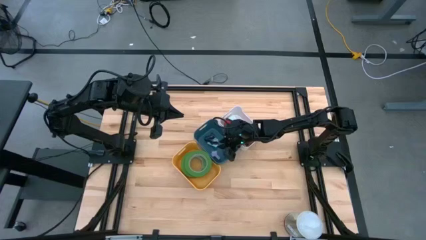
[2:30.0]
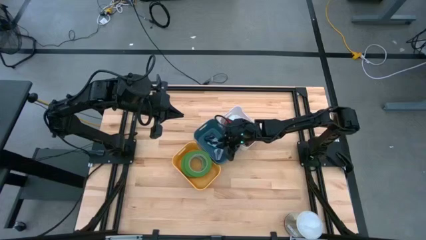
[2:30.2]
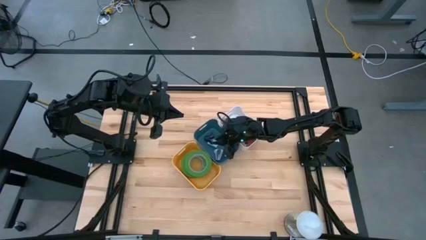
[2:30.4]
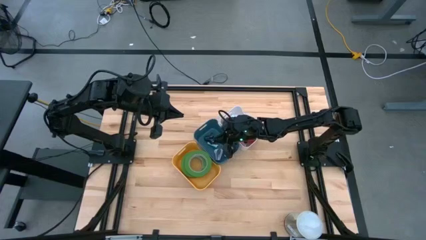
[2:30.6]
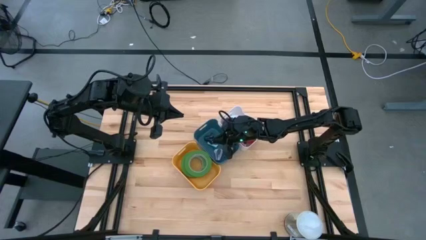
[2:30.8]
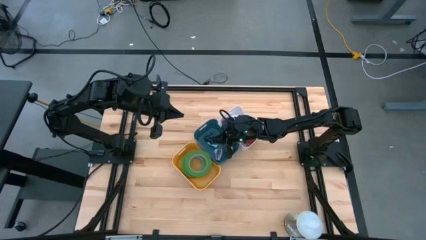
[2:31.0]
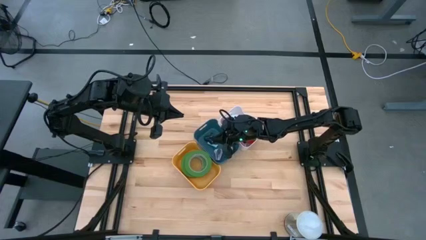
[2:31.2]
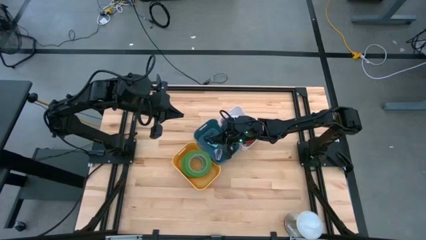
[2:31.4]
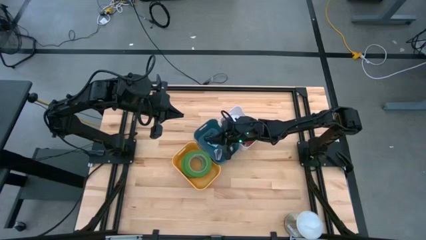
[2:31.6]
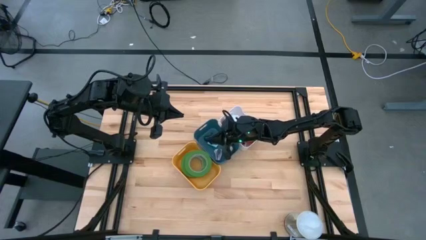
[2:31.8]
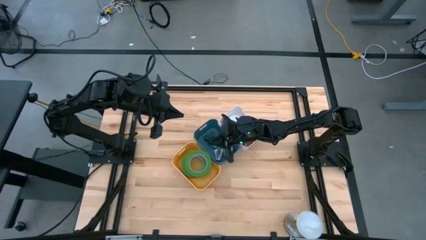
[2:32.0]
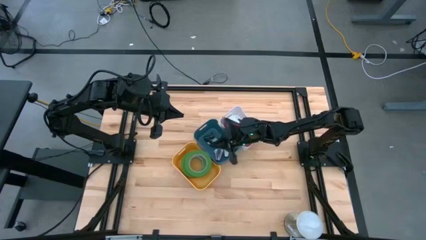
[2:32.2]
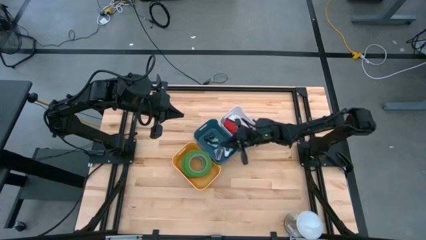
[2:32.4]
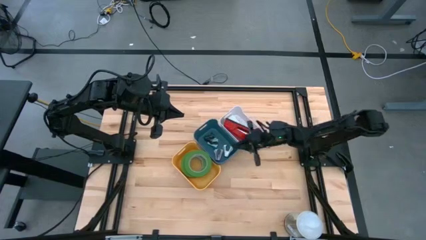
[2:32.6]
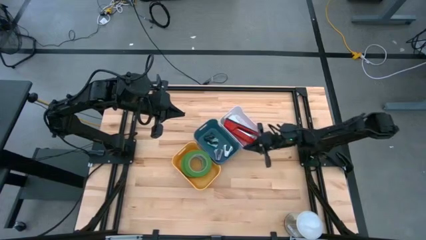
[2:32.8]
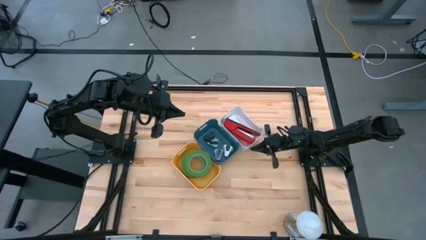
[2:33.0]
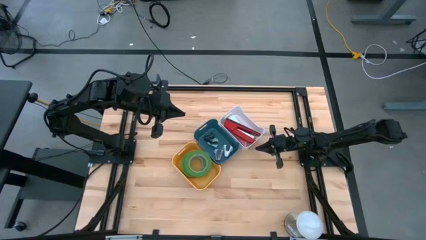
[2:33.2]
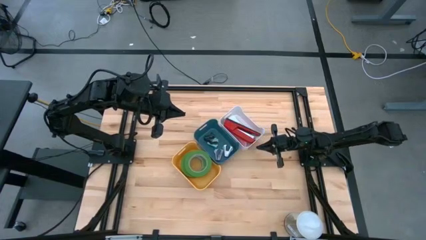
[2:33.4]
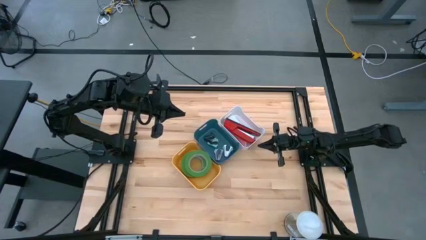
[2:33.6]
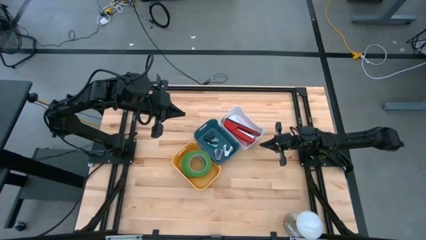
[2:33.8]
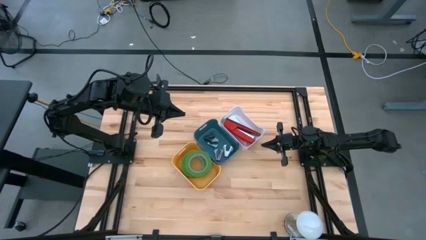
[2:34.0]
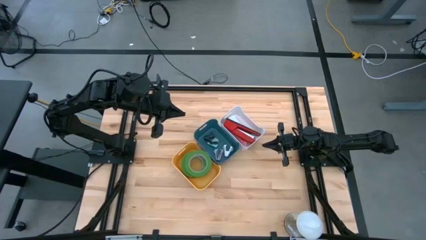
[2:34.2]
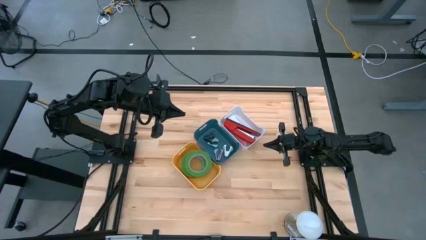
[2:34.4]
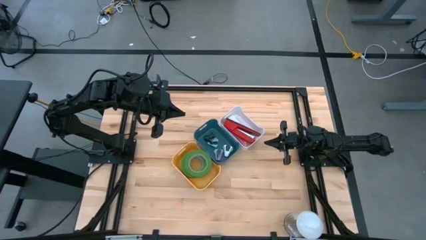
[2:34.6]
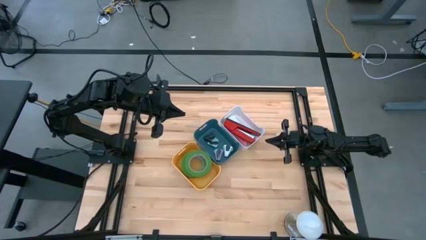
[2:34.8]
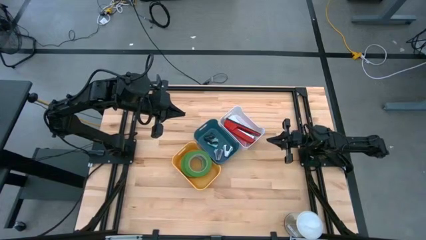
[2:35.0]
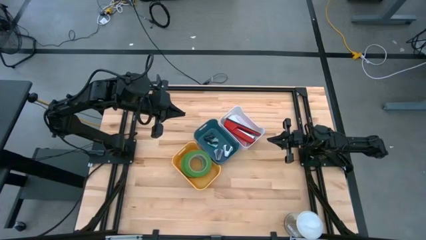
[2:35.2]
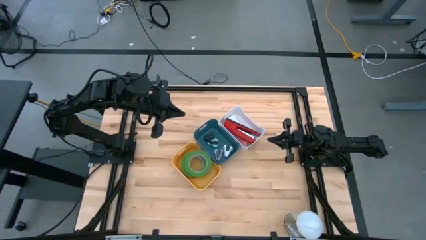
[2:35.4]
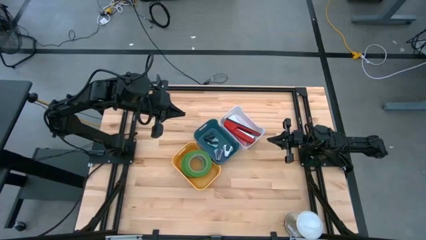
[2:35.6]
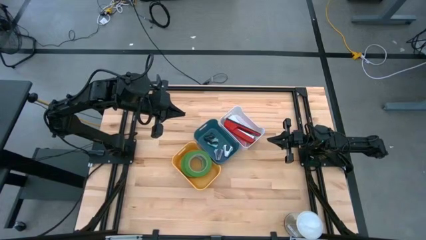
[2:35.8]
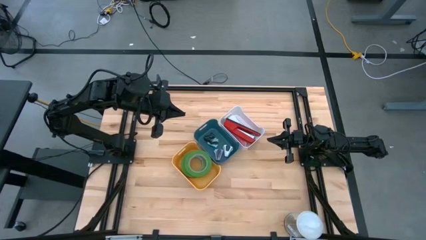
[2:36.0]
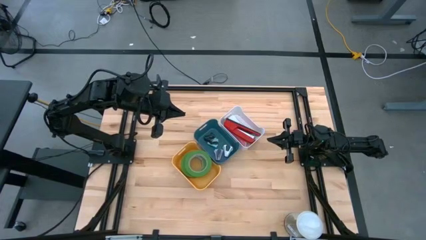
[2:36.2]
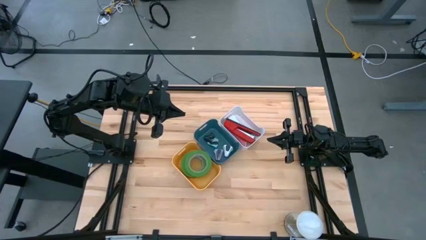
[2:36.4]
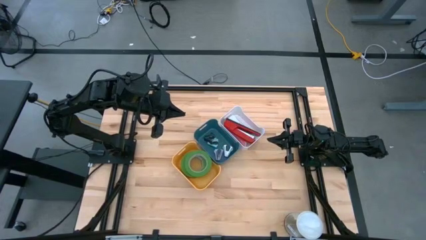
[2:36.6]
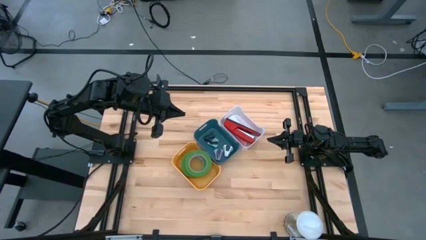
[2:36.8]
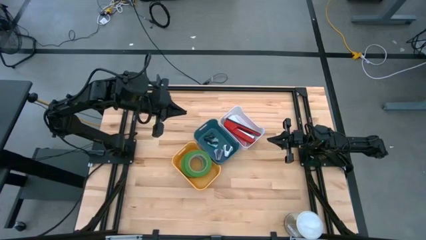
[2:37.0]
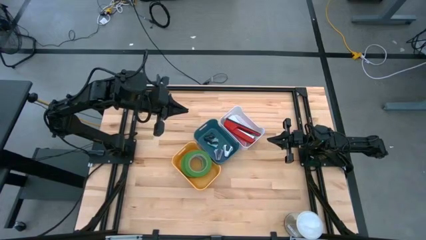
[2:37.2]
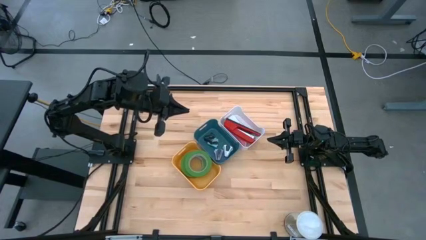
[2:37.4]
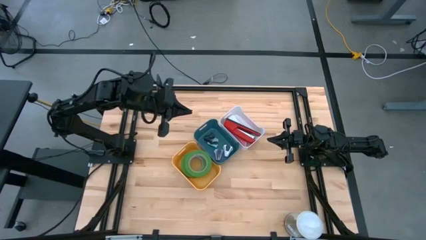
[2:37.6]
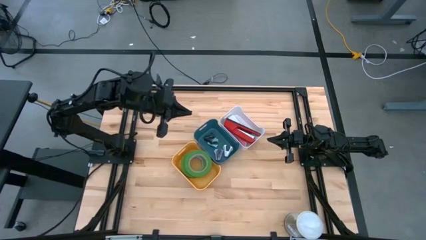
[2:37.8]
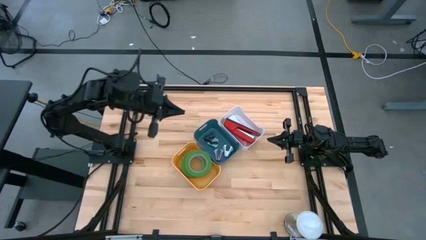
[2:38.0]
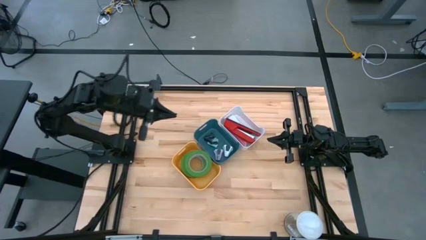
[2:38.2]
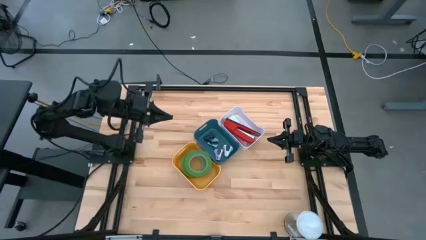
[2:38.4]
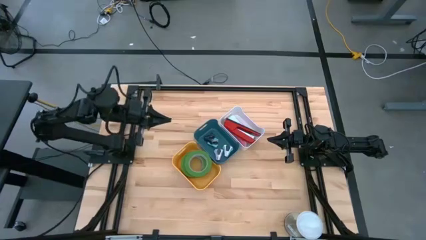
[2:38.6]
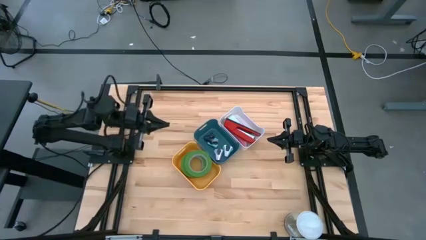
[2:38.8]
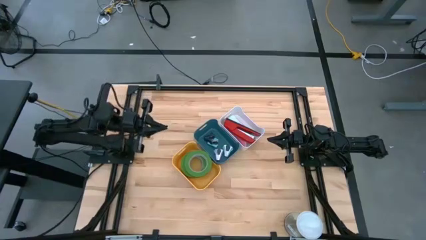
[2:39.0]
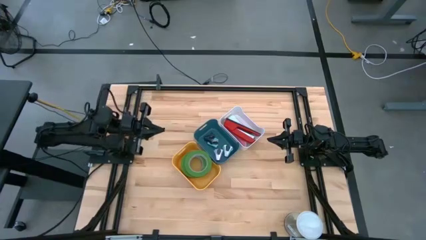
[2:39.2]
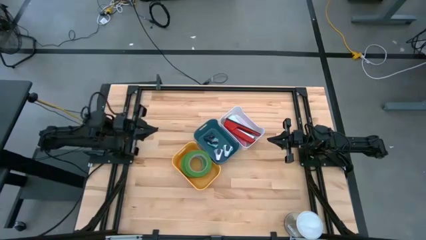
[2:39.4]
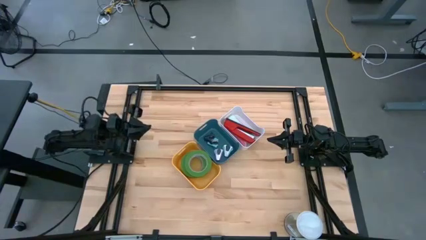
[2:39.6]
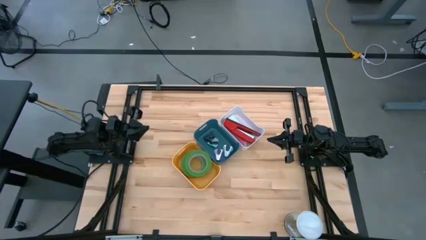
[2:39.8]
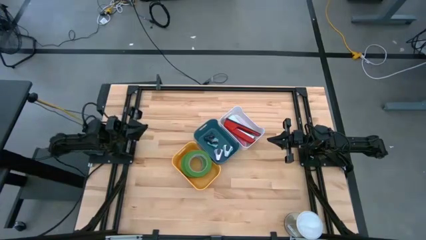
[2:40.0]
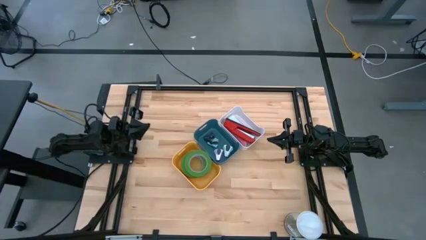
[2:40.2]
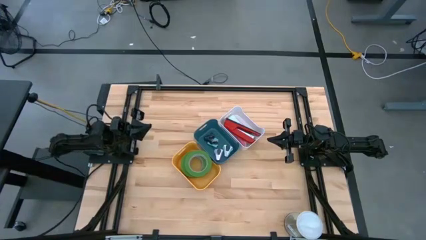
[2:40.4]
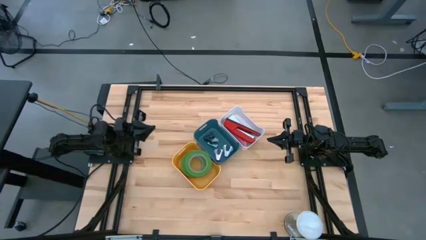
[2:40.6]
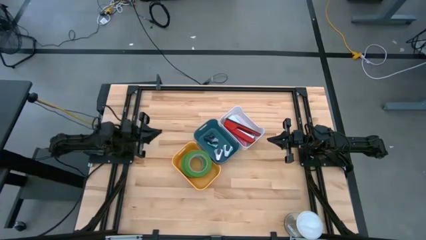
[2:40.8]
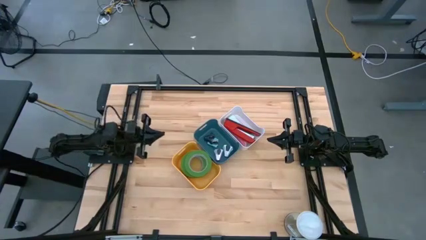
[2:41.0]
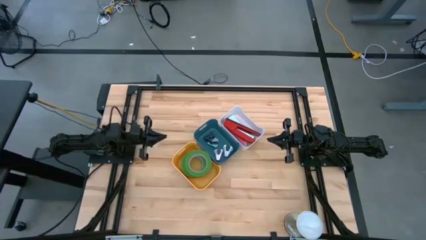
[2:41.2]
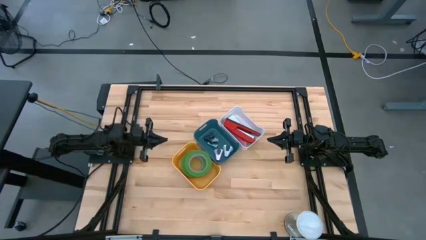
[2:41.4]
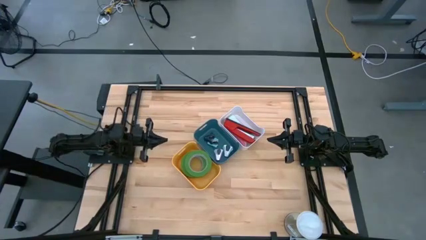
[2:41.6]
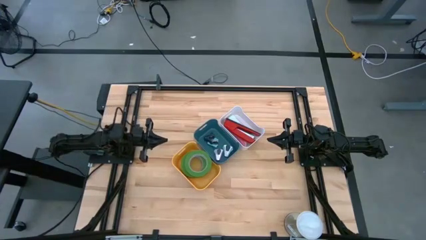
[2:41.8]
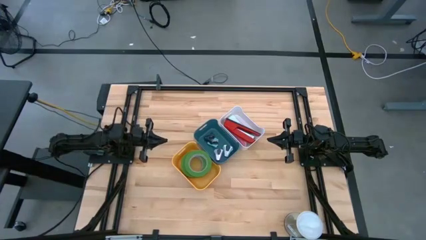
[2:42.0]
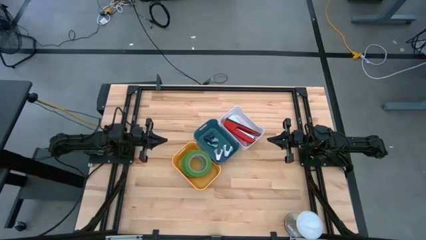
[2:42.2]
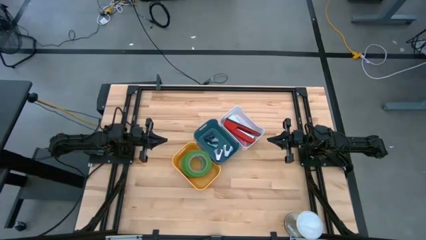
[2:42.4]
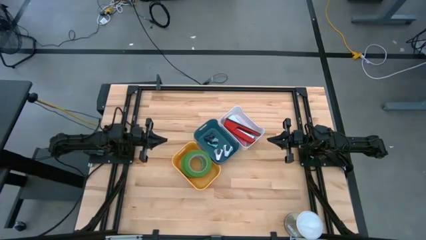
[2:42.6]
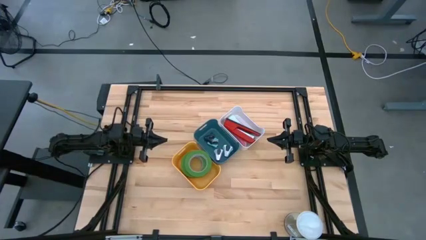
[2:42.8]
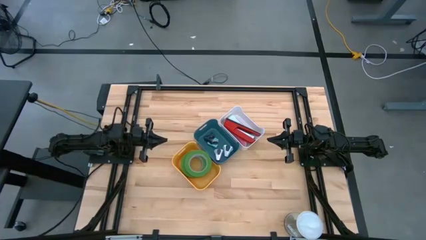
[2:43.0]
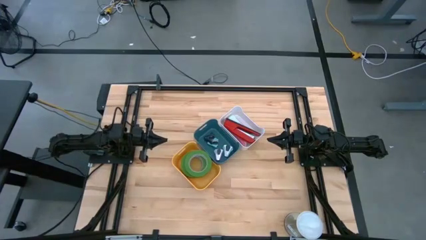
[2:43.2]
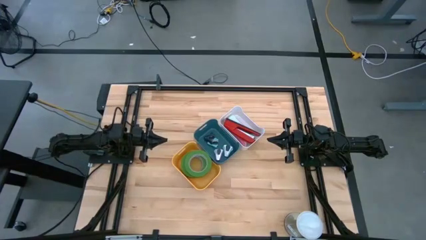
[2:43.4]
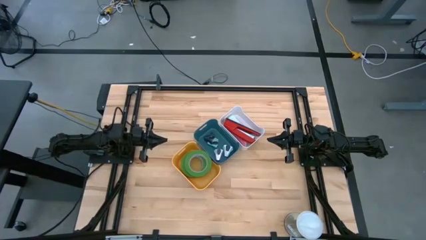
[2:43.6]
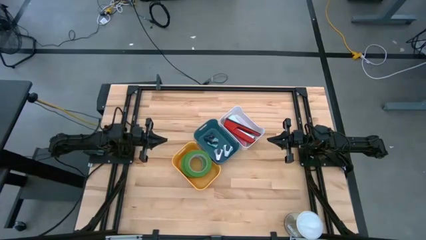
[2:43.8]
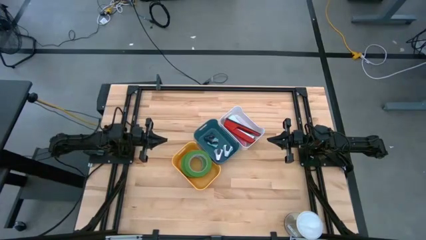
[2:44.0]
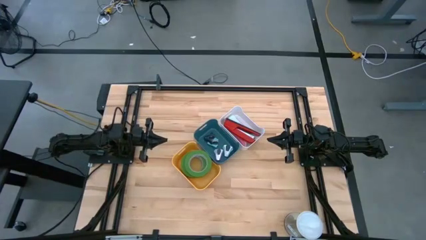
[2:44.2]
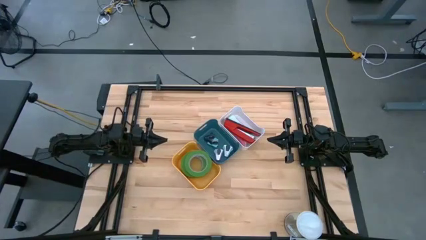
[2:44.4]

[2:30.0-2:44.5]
Task: Pick and place Stapler, Stapler remover, tape
Return to Home Position

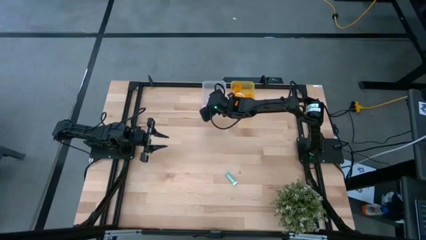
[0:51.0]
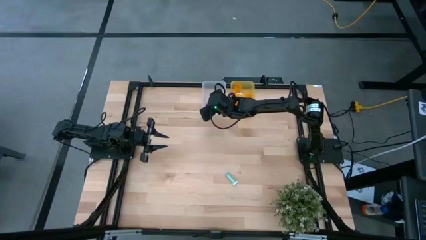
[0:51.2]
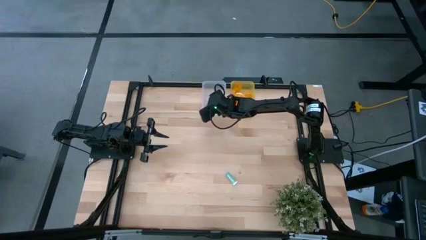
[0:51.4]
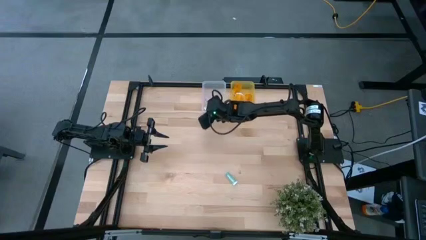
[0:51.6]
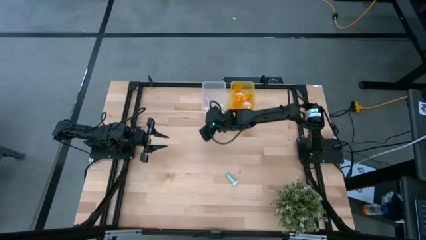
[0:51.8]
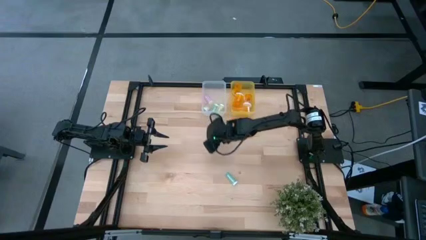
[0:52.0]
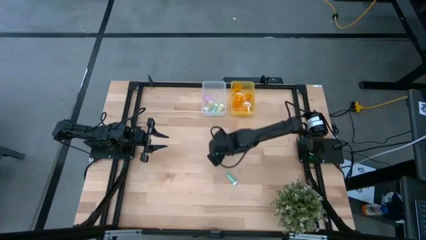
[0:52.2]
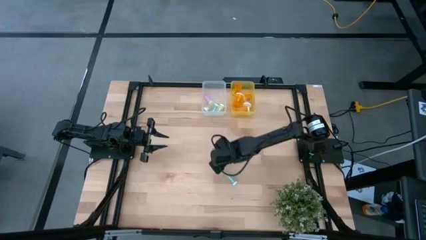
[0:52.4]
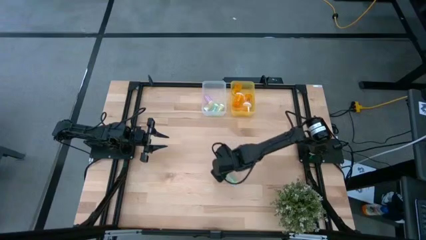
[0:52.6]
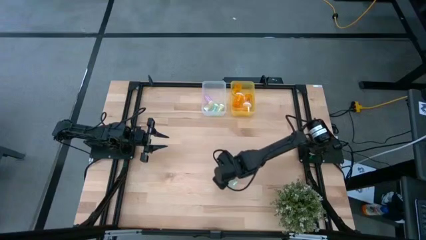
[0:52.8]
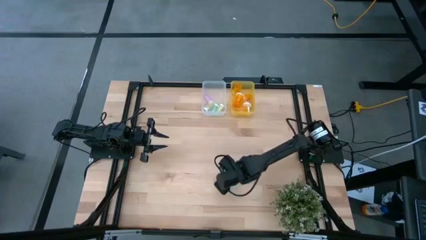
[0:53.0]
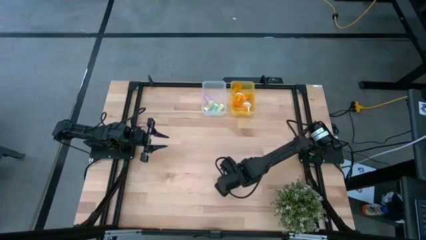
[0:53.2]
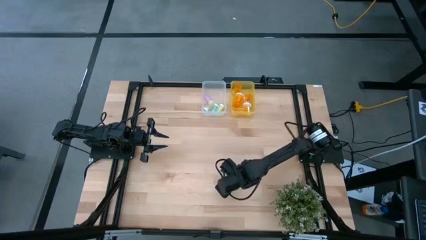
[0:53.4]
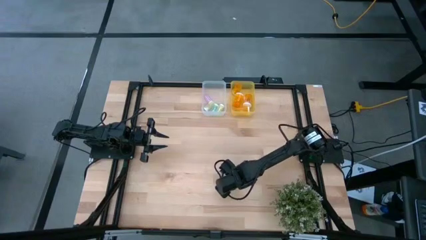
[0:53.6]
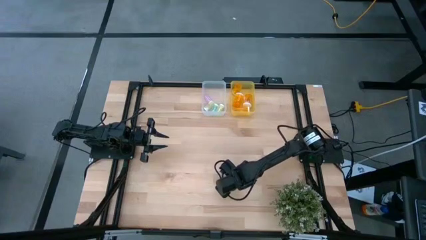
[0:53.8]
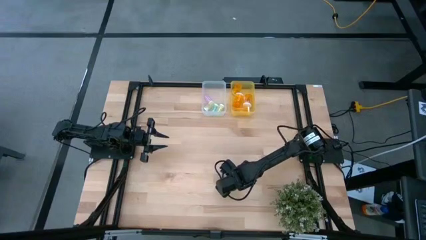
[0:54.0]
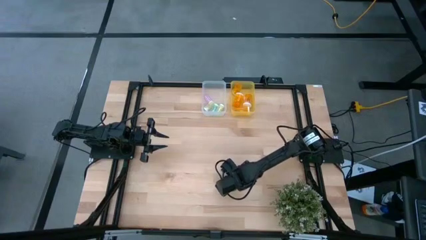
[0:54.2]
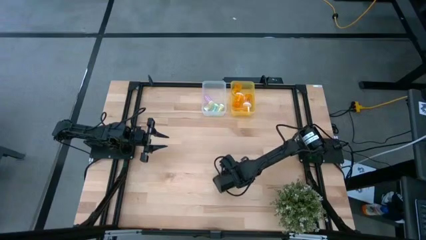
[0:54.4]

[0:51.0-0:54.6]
Task: Pick and place medicine bottles into bin by pill shape (circle, oval)
Put the small blue pill bottle into the transparent bin
